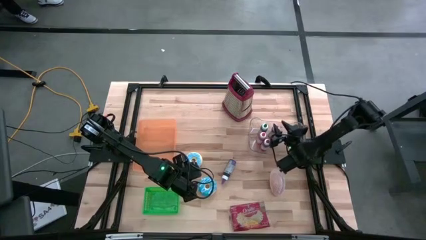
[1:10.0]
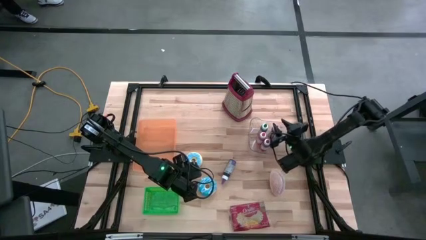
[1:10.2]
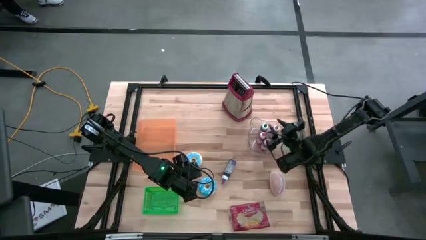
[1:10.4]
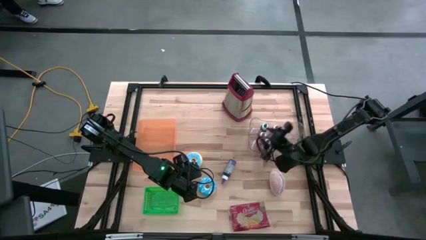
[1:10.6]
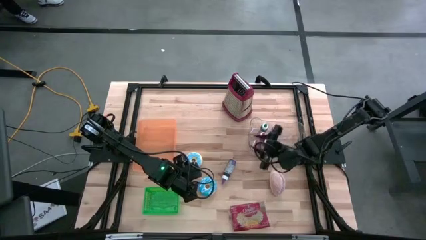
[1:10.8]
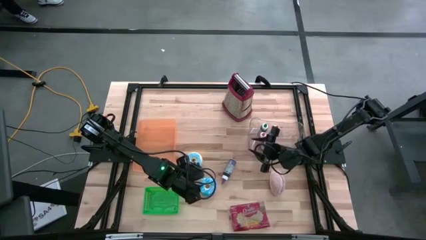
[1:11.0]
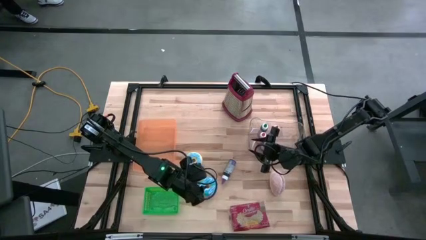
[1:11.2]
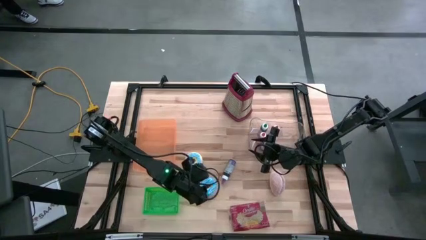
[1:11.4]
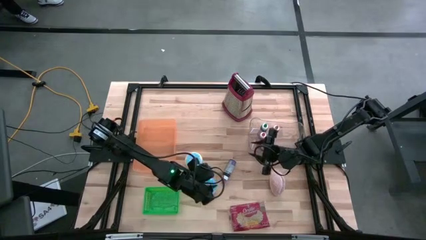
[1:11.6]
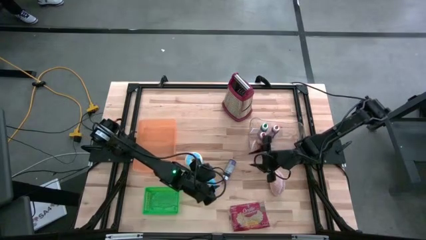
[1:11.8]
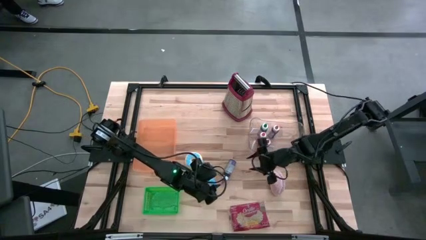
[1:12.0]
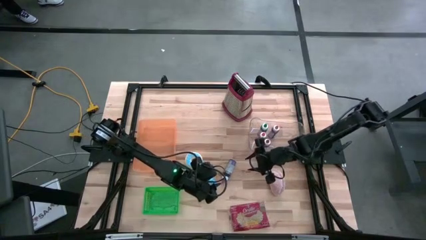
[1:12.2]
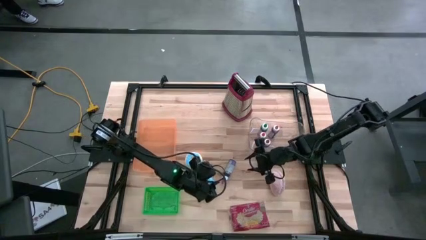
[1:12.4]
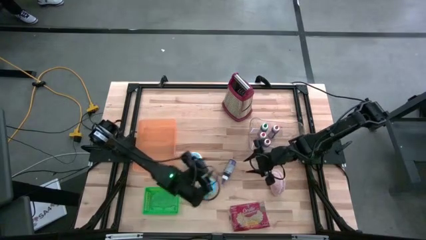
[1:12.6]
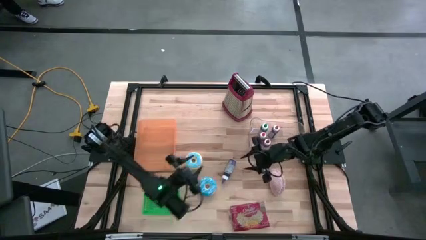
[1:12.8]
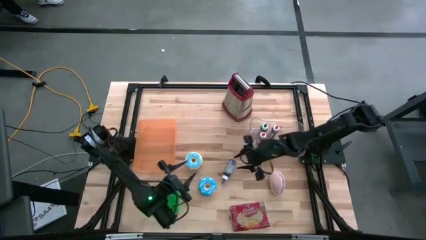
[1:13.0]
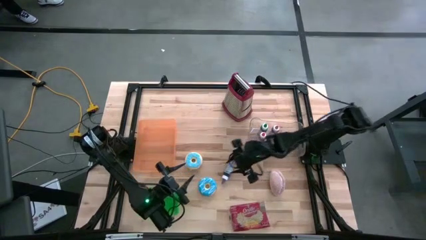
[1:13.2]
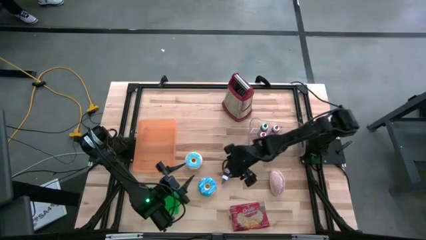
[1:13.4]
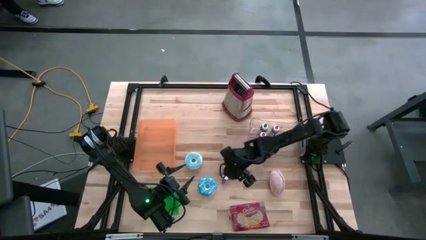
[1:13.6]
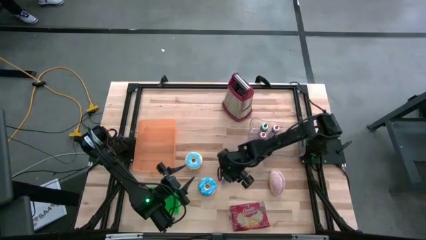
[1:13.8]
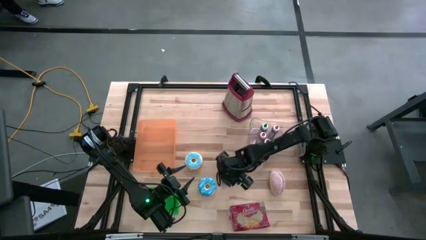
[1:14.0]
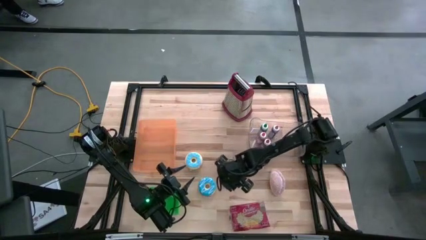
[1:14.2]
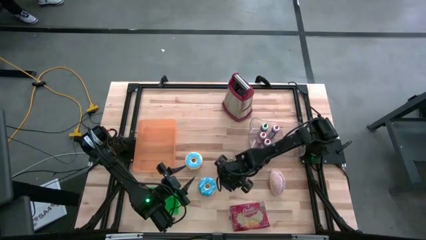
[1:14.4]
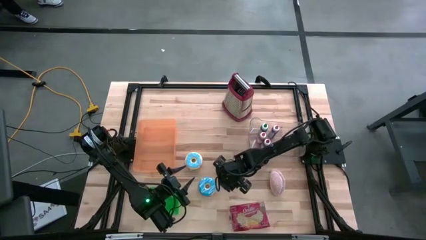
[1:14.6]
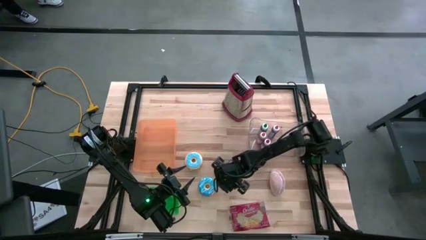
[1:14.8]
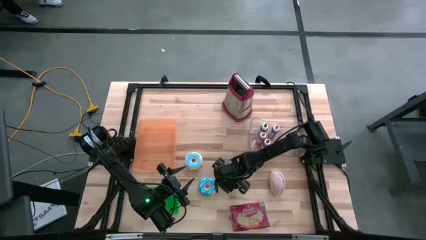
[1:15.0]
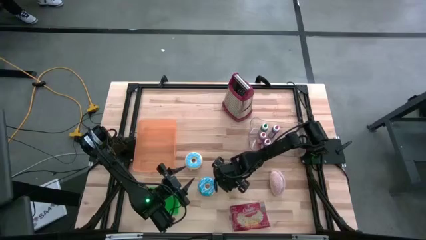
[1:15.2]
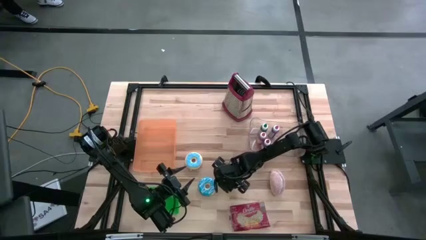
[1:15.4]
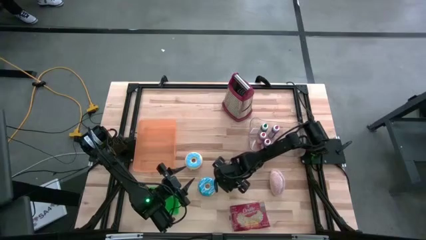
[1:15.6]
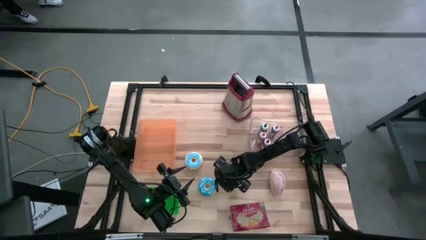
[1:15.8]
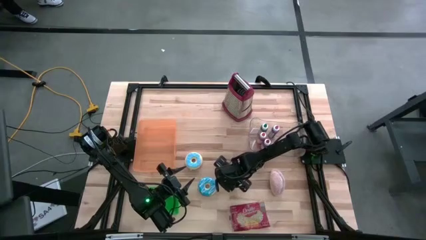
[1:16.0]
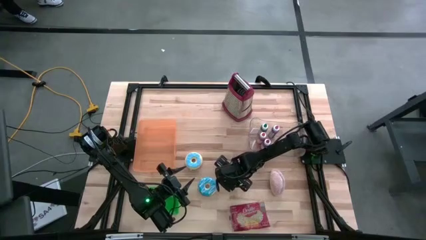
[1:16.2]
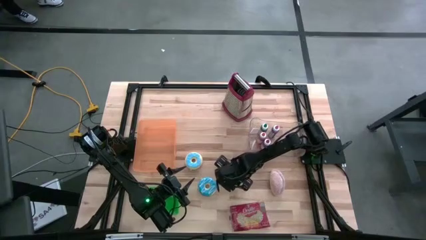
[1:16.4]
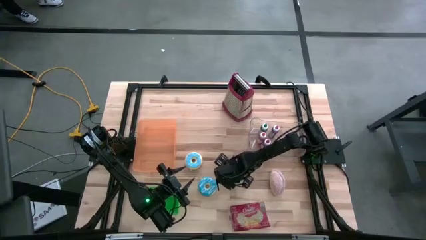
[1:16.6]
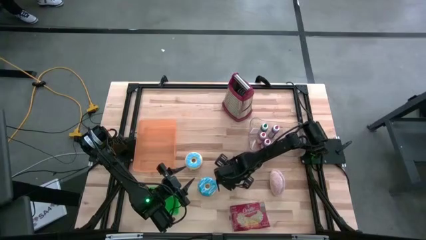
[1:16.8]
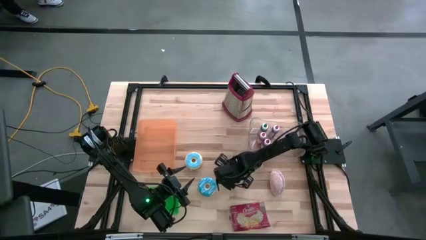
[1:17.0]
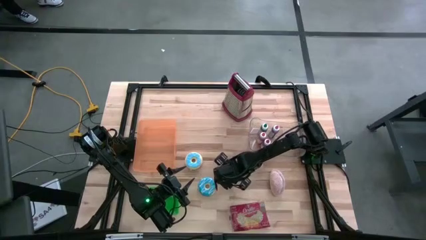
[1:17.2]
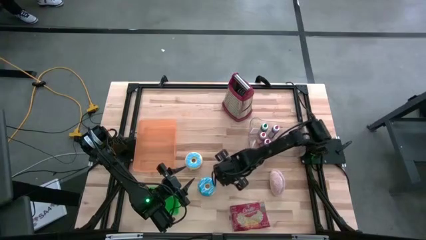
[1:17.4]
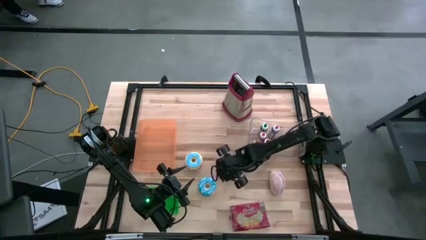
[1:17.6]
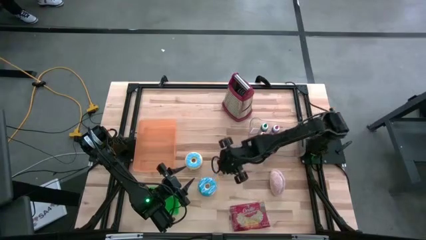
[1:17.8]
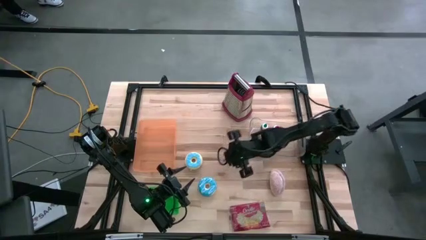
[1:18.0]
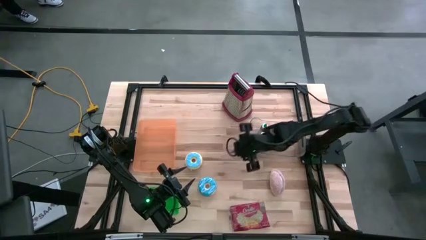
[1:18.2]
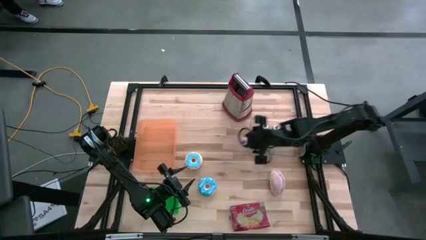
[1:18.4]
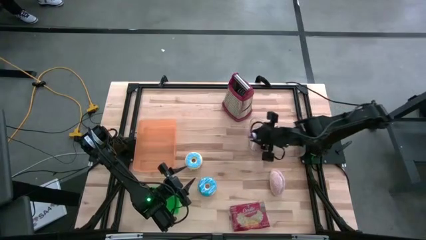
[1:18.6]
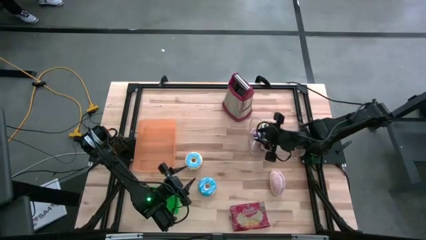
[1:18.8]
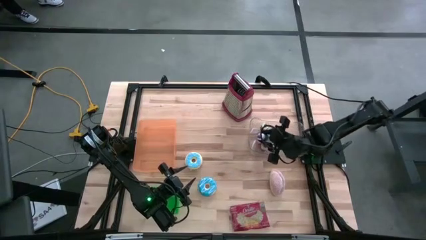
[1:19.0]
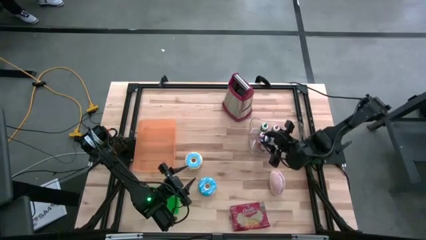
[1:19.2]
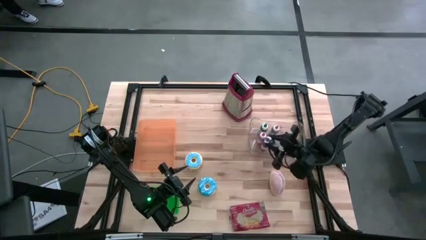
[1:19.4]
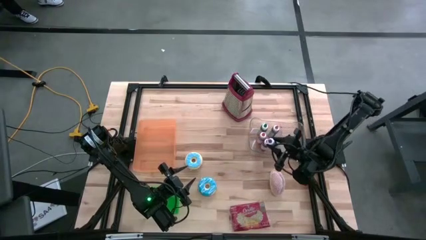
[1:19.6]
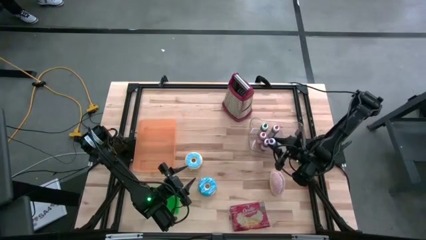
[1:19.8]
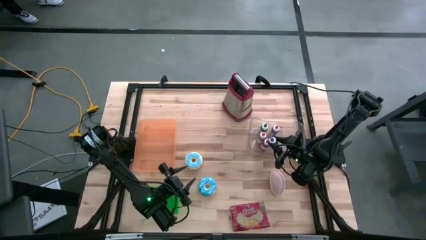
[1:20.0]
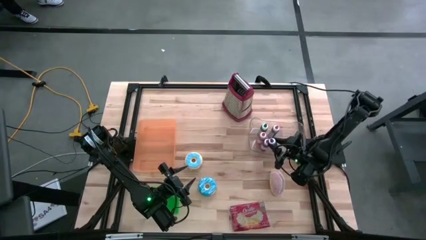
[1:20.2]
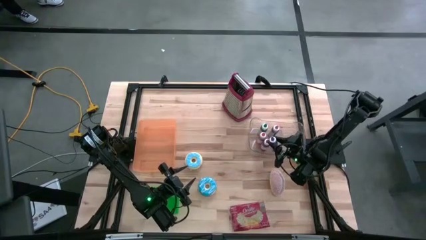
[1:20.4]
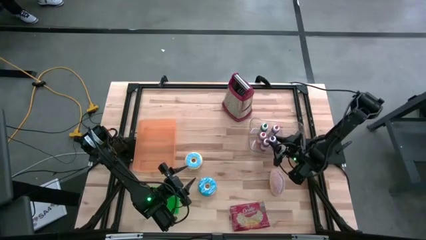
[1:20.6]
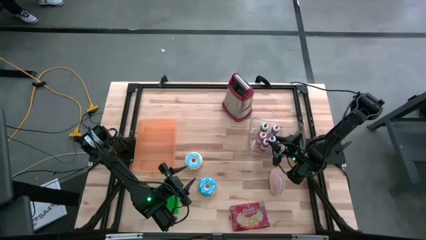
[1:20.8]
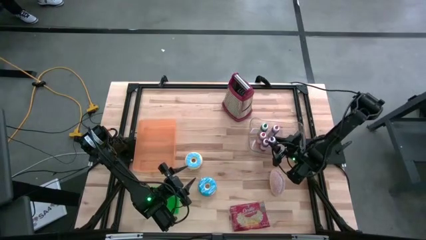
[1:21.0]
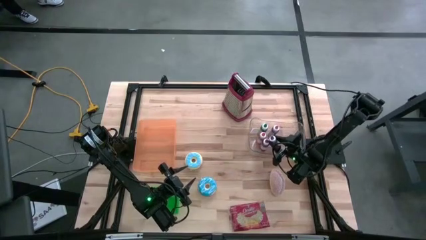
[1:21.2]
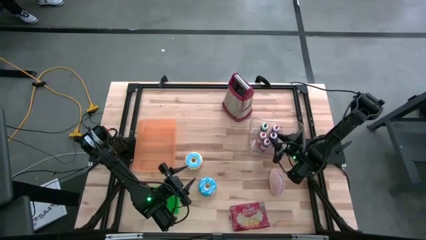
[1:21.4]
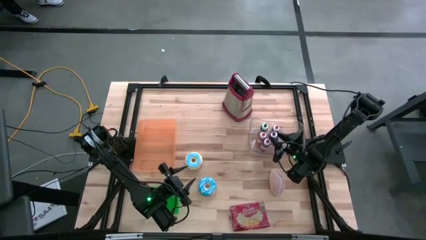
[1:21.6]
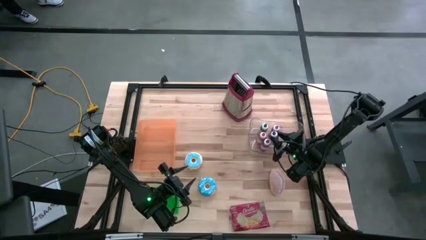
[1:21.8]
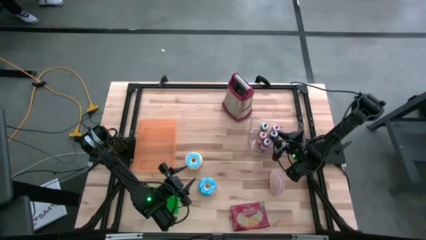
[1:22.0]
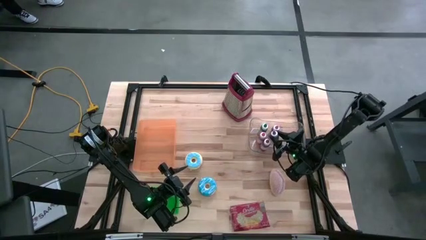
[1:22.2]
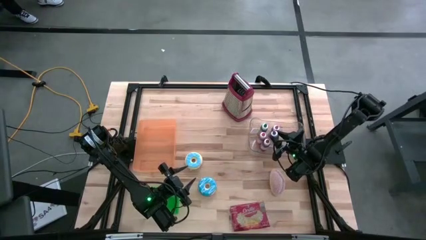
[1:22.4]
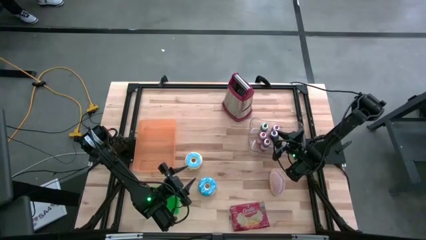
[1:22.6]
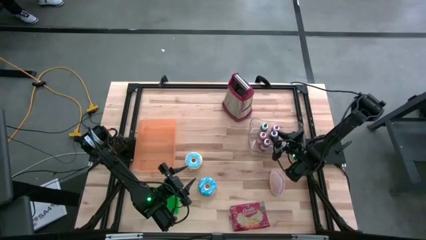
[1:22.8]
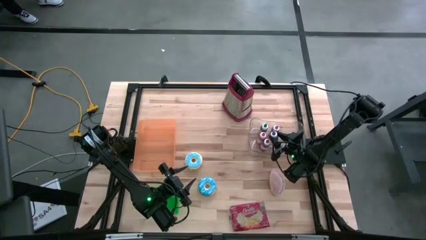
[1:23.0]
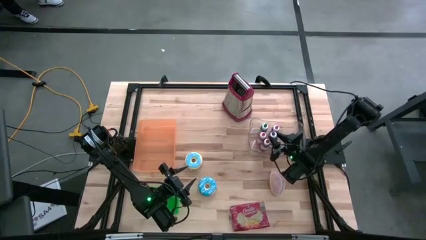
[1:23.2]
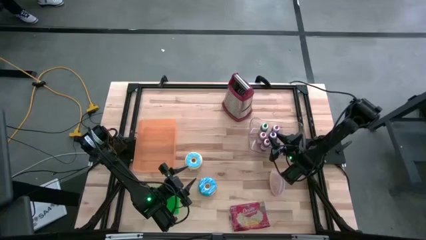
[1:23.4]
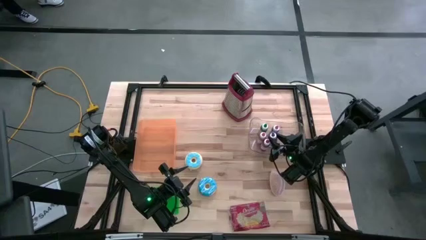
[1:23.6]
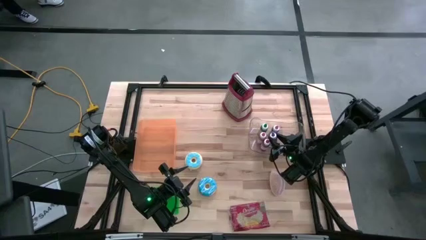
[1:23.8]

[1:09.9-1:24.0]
Put the violet food coloring into the transparent bin
